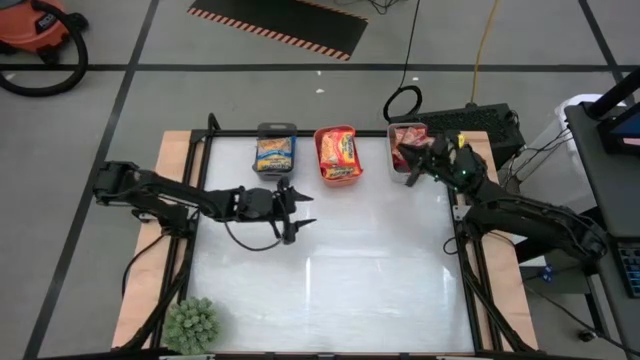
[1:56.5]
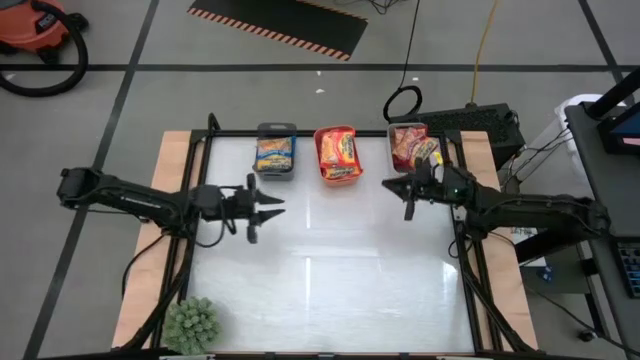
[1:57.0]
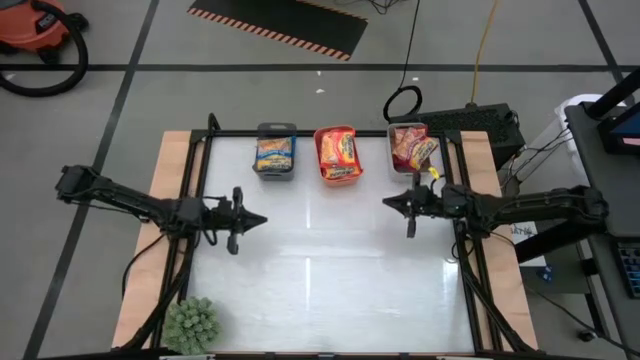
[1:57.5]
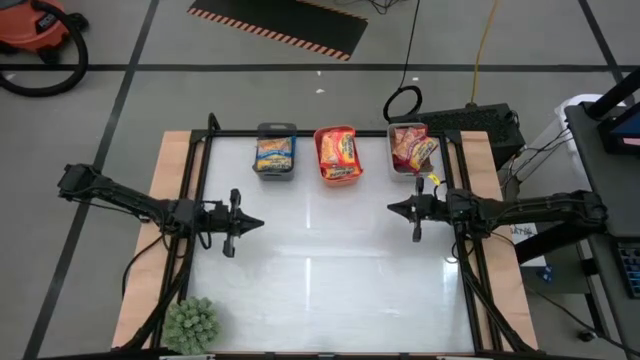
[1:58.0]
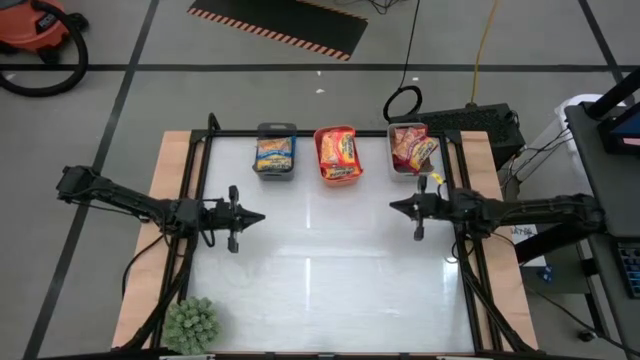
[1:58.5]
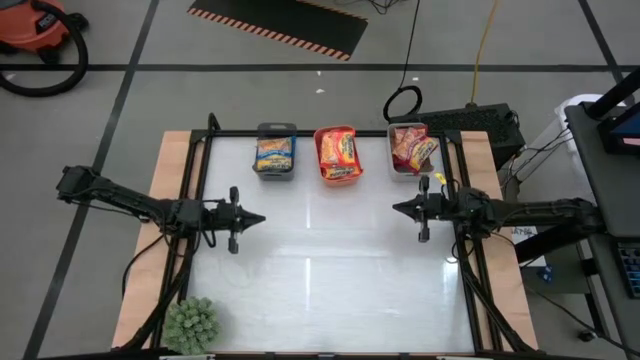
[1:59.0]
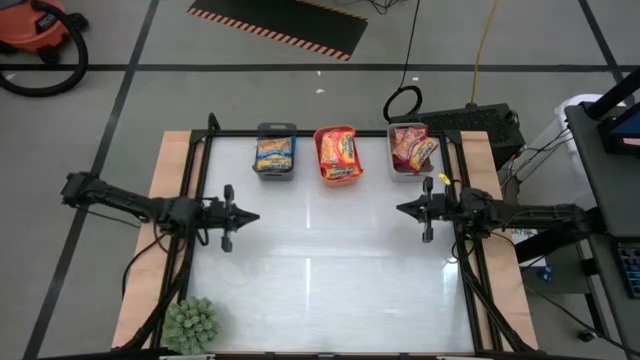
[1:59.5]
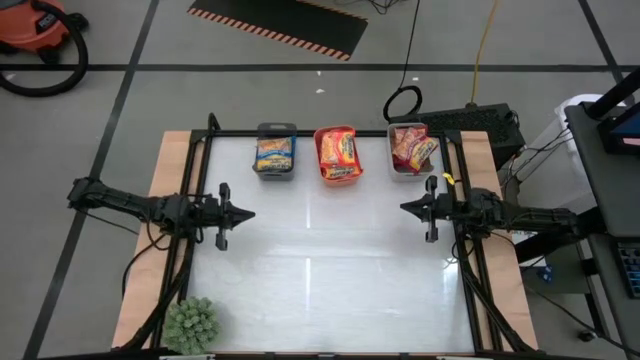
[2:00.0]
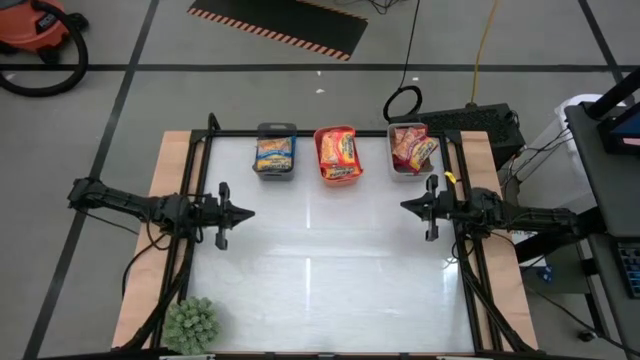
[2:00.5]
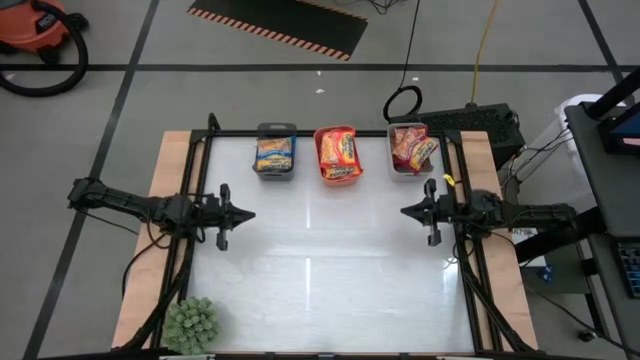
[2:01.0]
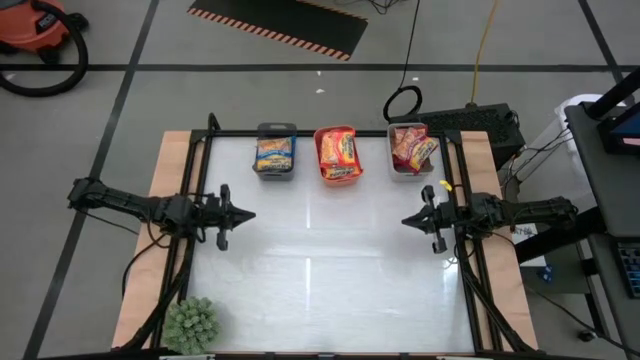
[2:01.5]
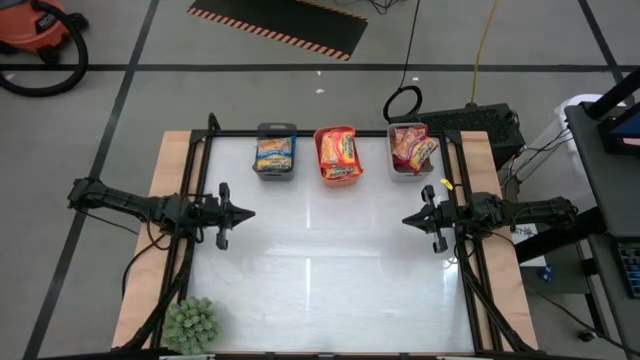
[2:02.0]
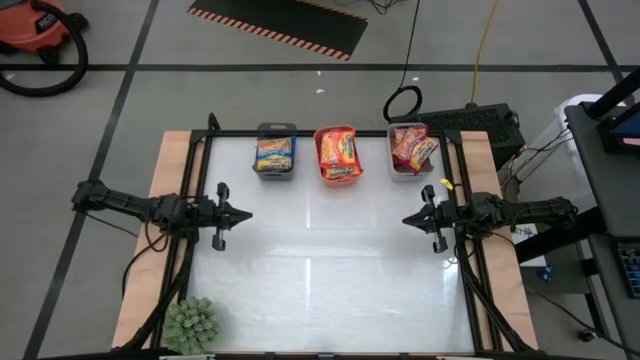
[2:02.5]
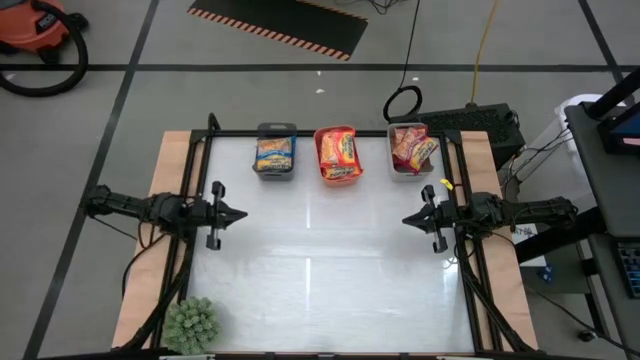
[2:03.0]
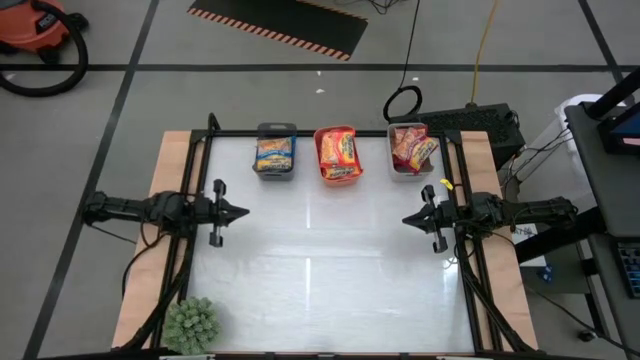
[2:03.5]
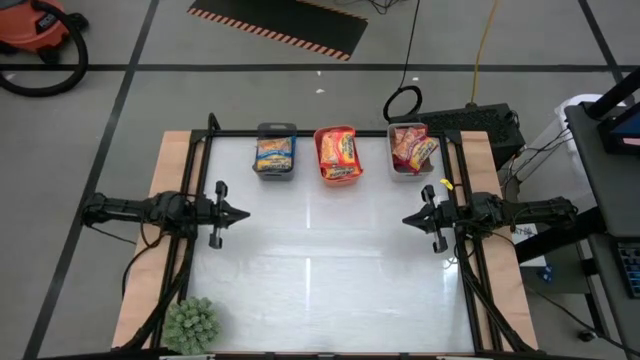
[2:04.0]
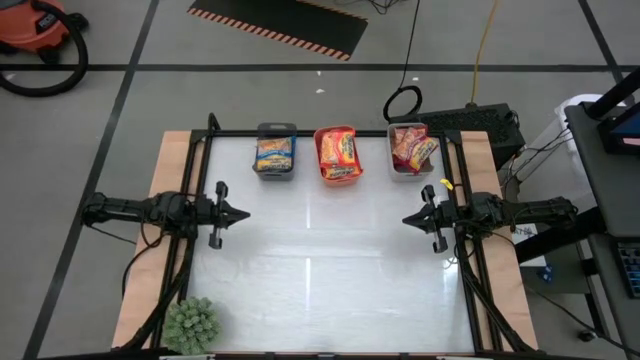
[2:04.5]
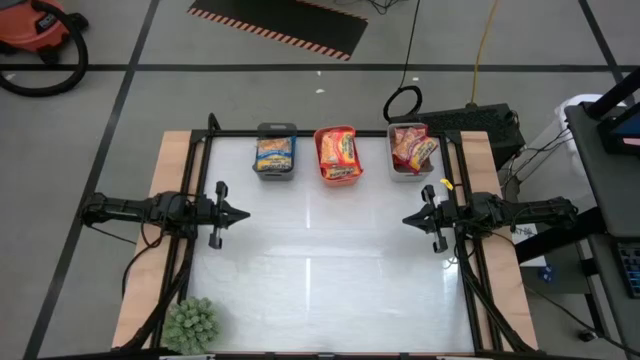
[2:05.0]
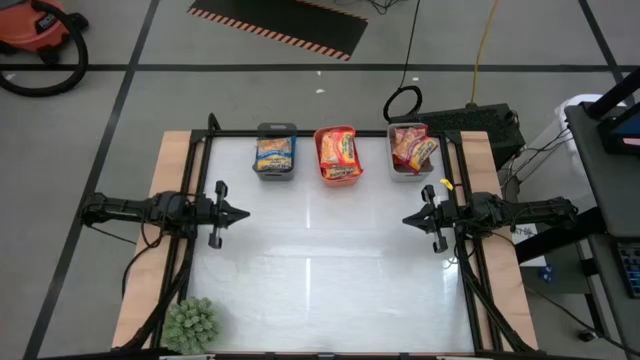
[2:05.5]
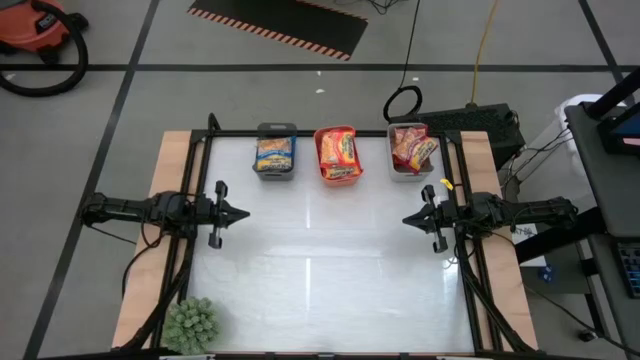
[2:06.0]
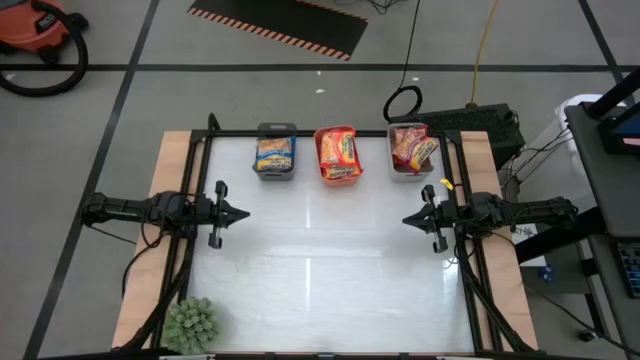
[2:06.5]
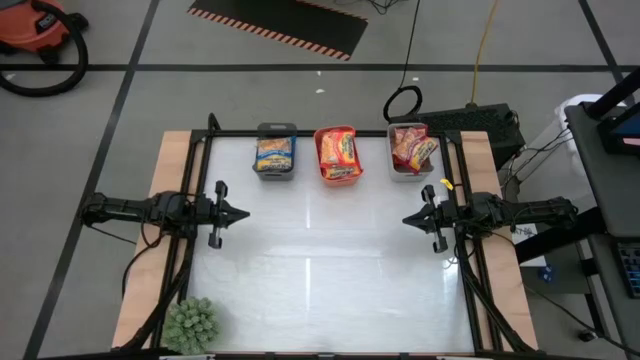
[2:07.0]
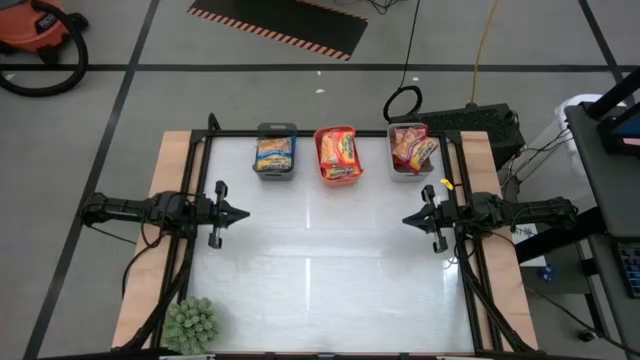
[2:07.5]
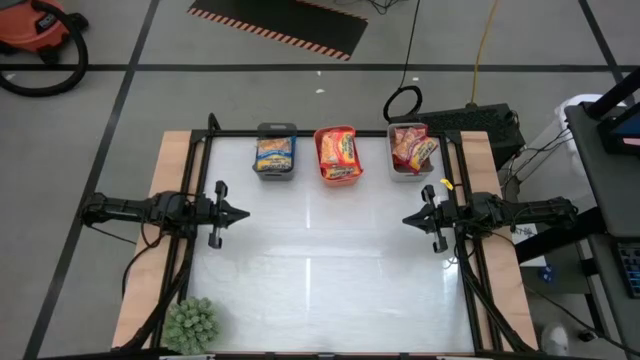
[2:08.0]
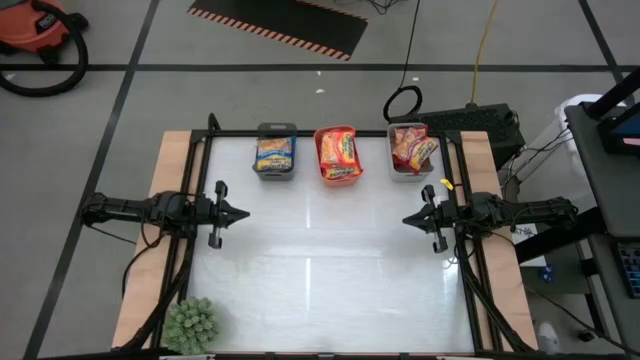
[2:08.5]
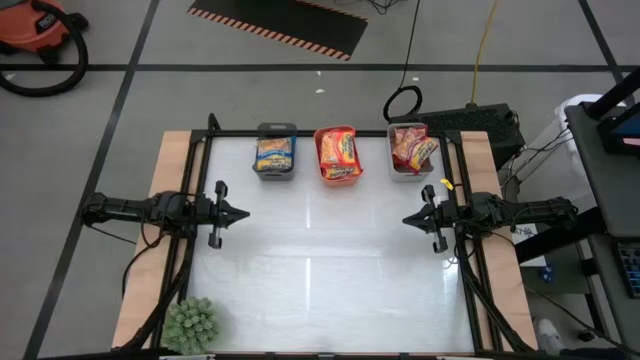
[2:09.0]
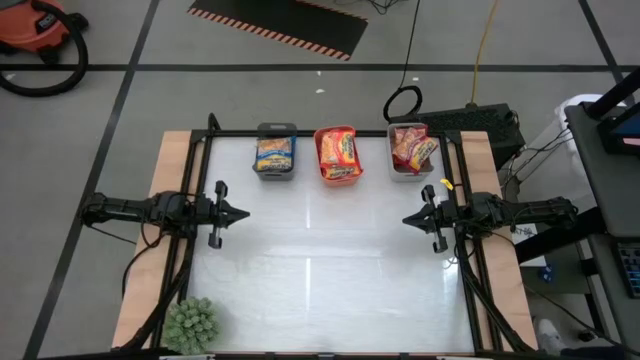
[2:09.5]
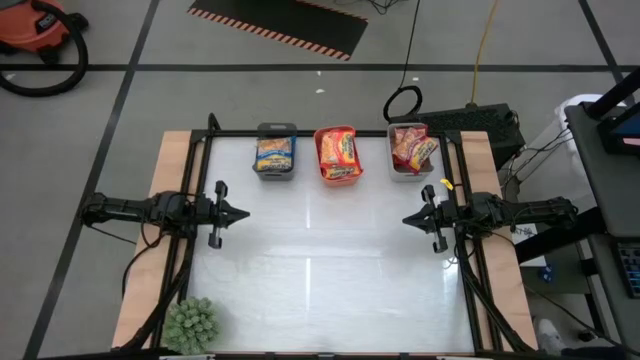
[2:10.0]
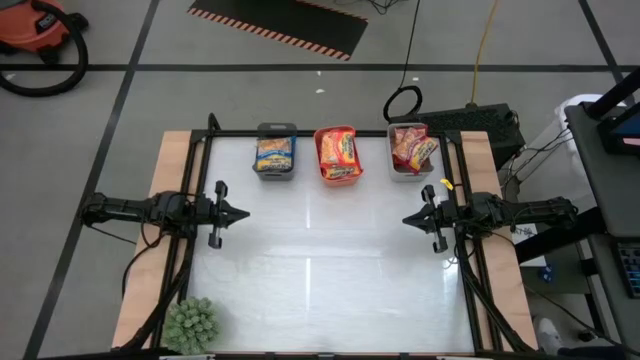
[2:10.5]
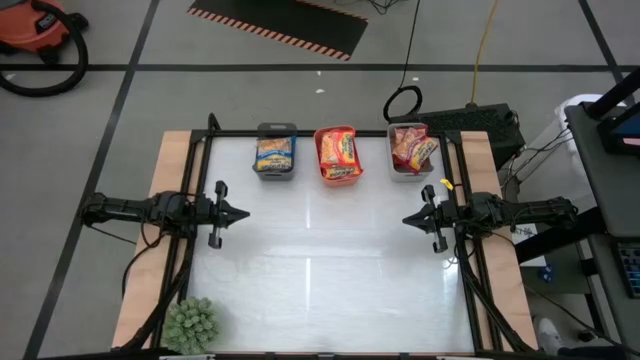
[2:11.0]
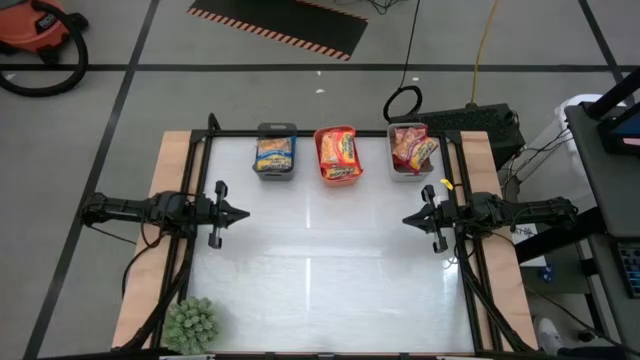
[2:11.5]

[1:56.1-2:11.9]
Task: Sort Maruchan noodles
Return to Home Position

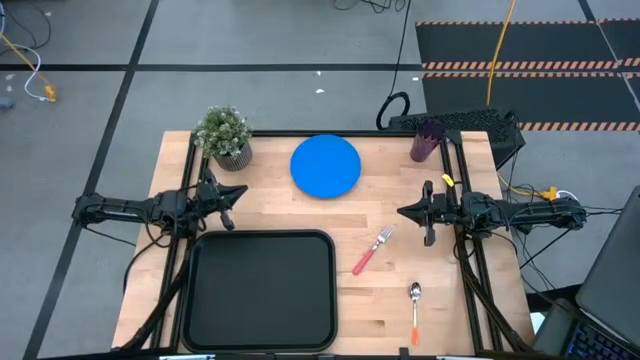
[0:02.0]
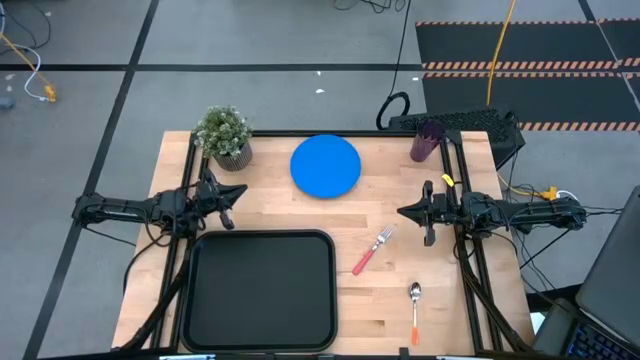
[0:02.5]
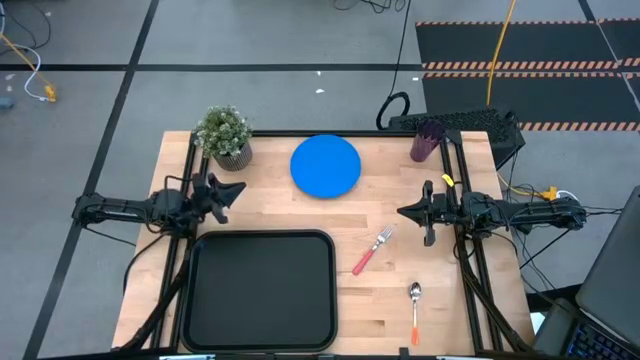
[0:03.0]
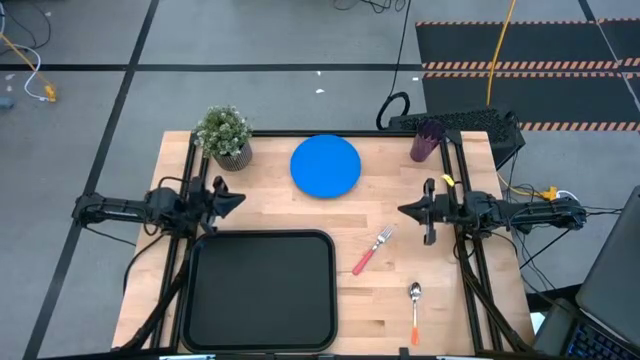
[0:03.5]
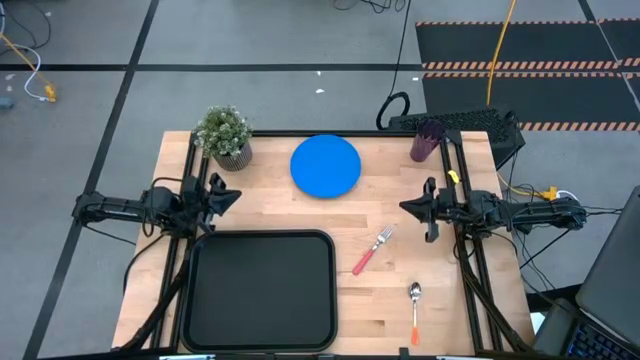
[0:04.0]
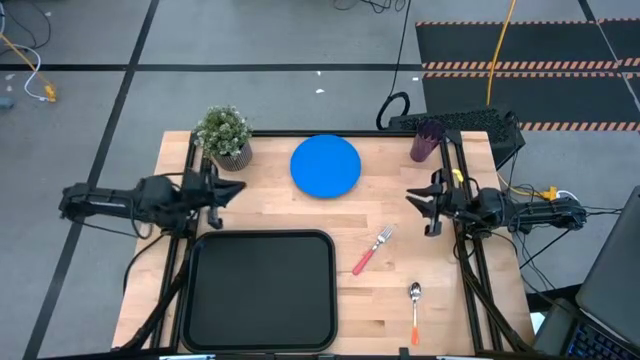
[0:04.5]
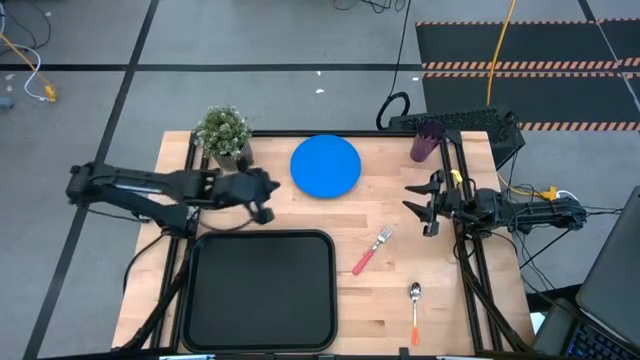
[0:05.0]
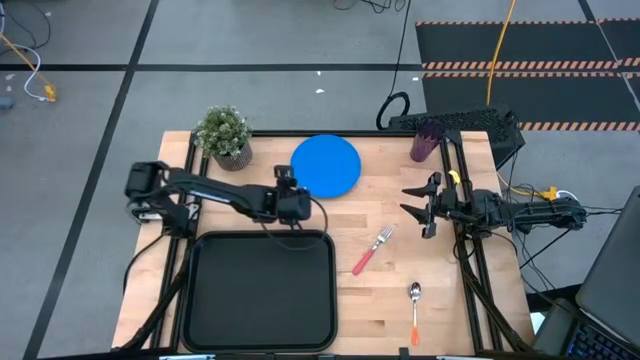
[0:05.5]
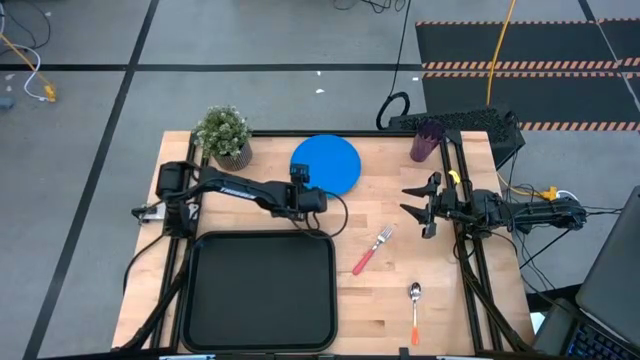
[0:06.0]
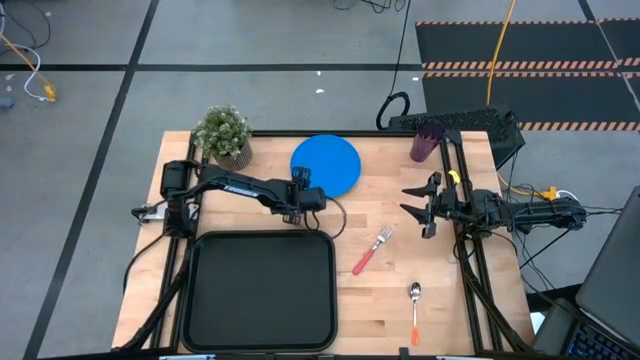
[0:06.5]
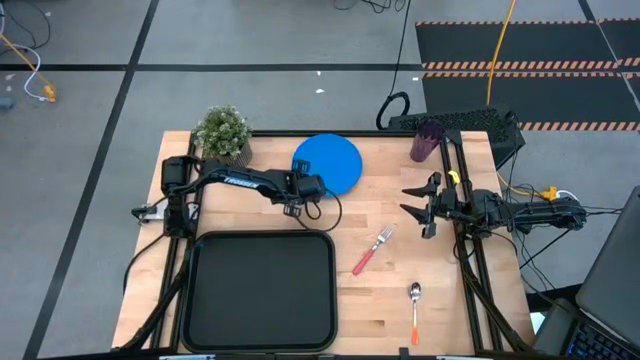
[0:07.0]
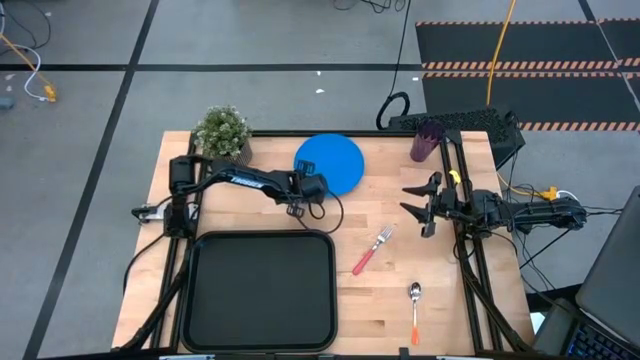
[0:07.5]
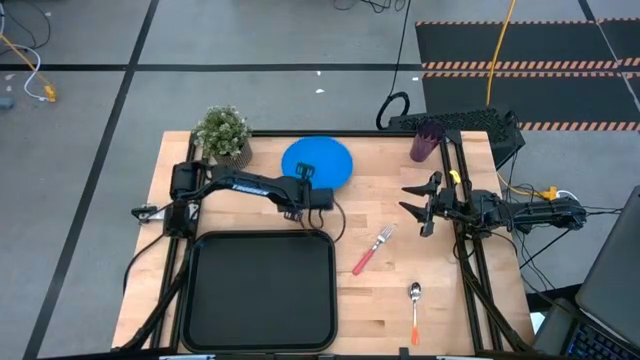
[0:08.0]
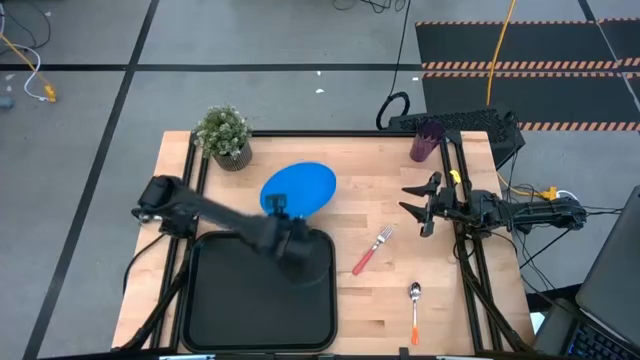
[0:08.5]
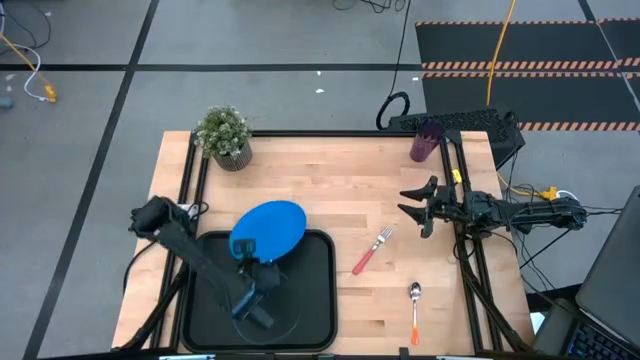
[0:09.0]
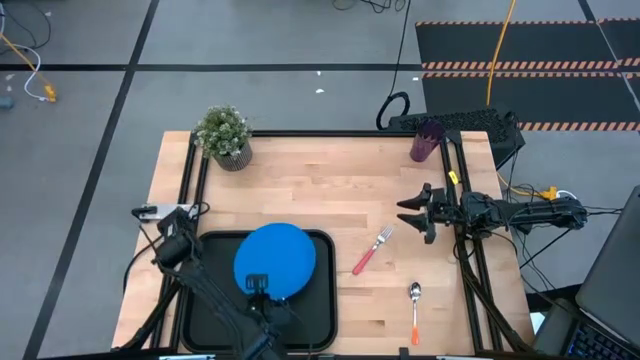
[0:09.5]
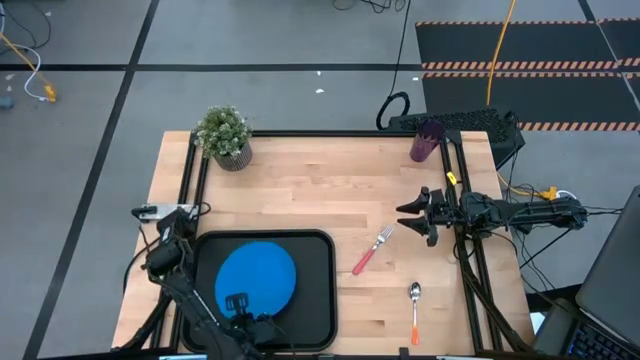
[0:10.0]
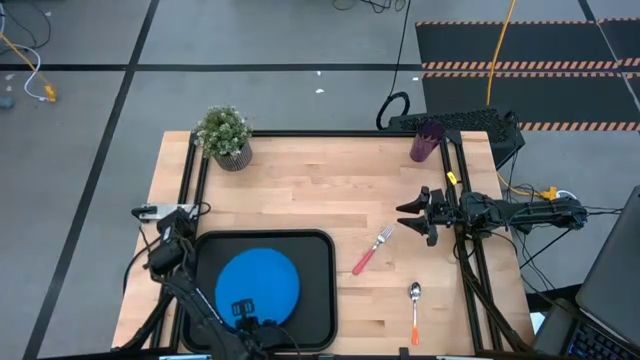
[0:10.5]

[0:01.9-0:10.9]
Task: Pick and place plate/cup/fork/spoon on tray
Put the blue plate on the black tray
